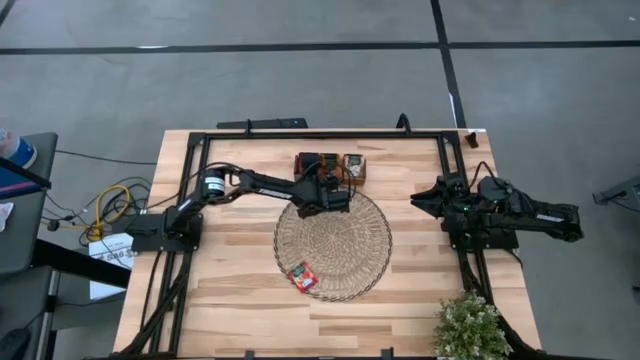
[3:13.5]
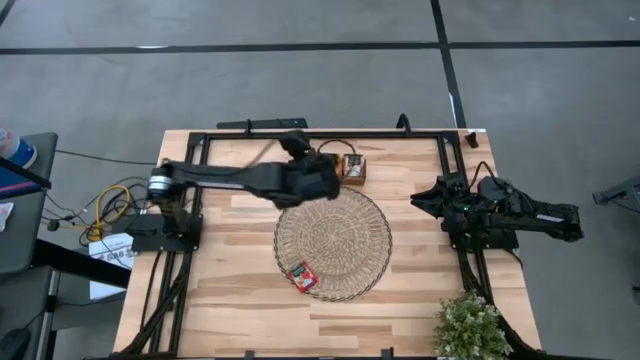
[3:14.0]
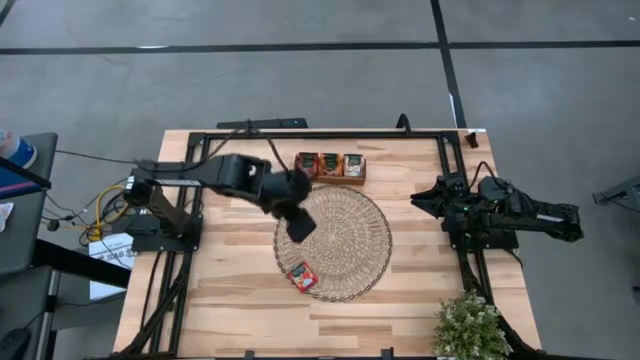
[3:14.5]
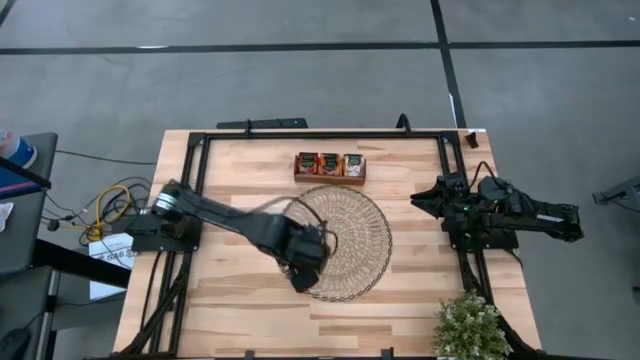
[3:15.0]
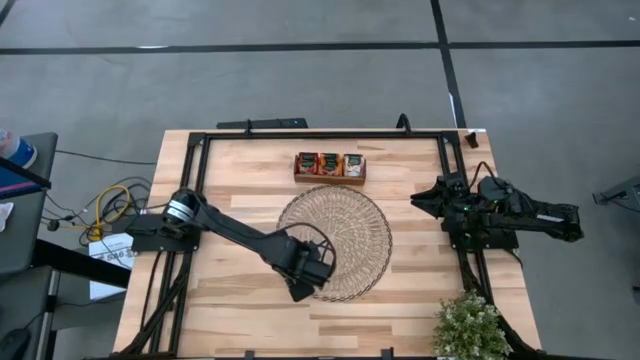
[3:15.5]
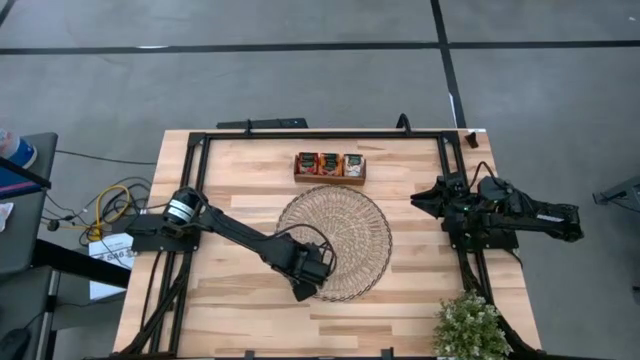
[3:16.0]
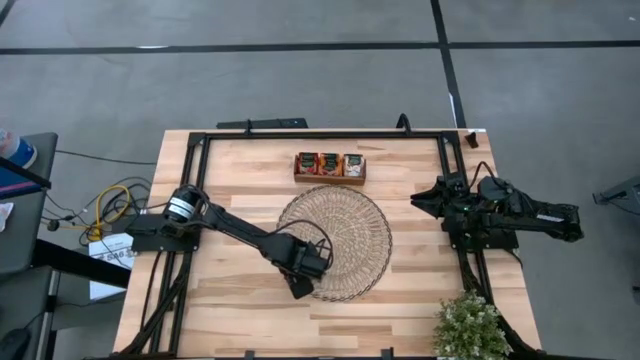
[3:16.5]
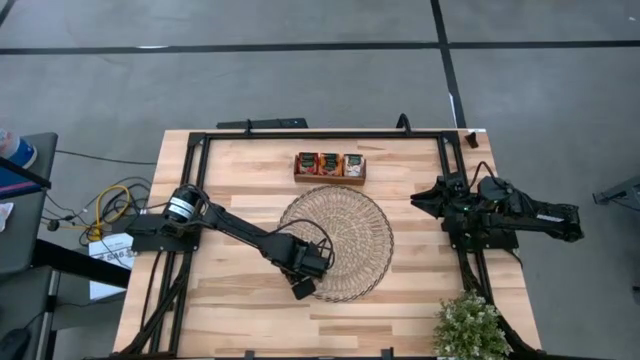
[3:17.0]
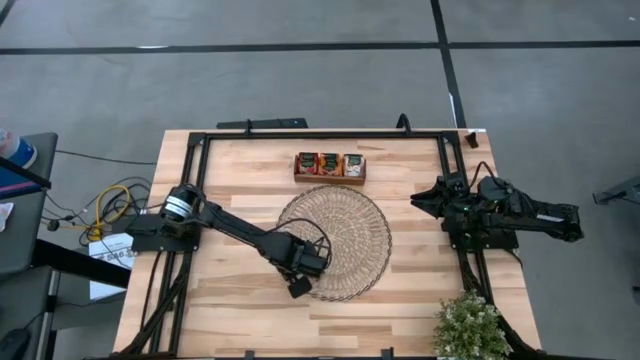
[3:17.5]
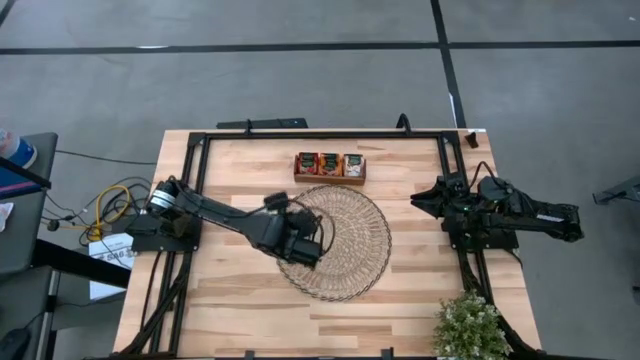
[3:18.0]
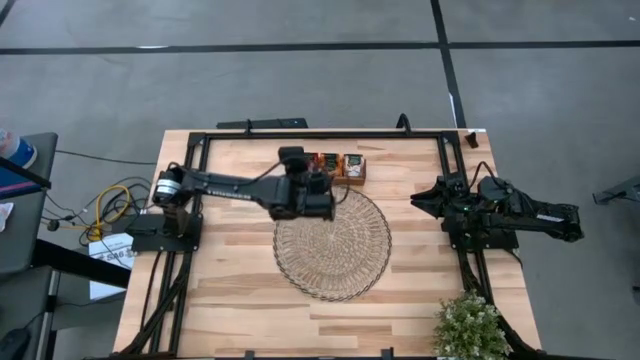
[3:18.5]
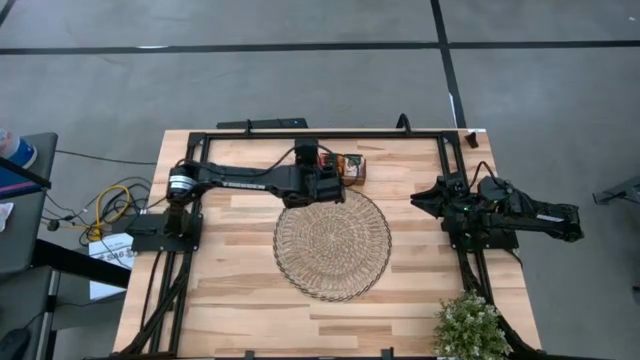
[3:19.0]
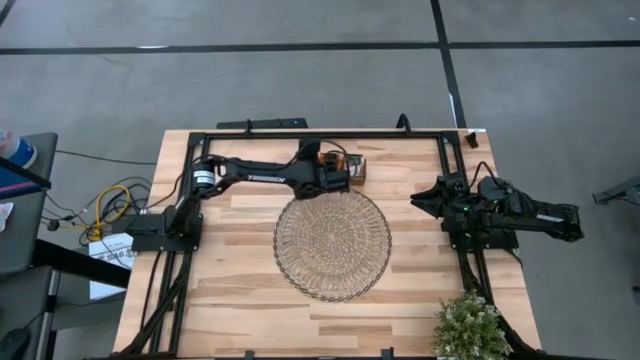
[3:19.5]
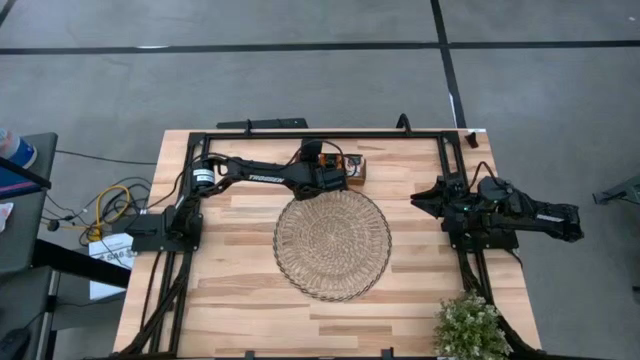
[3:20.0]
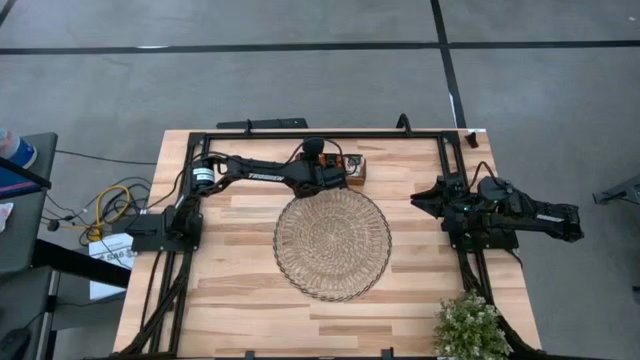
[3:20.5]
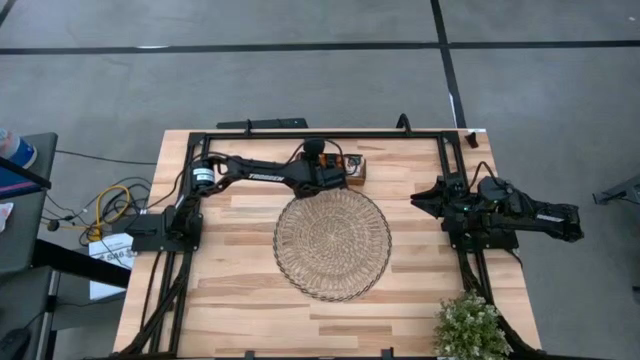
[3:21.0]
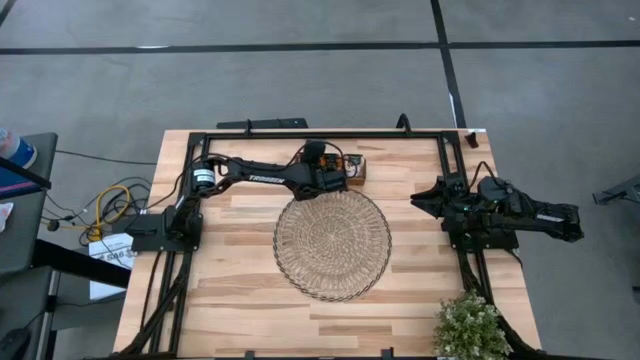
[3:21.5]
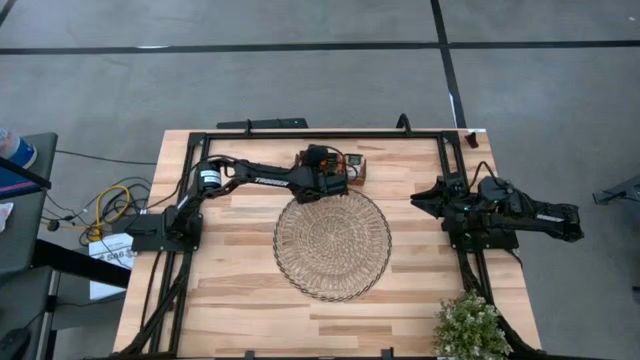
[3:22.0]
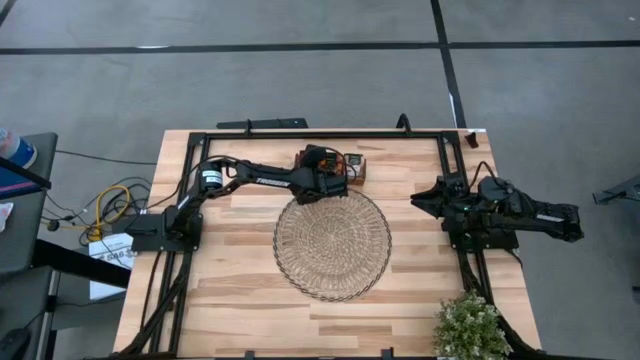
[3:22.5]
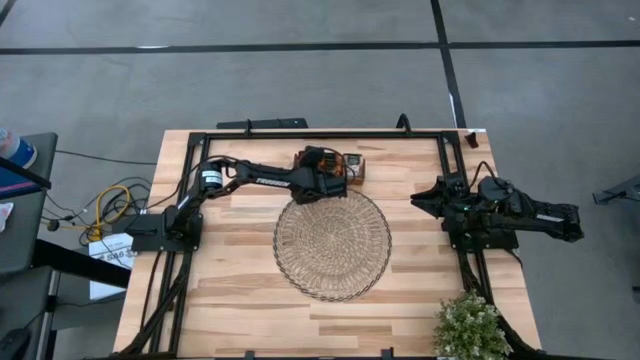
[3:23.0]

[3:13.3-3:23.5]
Task: Pick & Place Tea
Put the red tea bag into the left slot of the wooden organizer

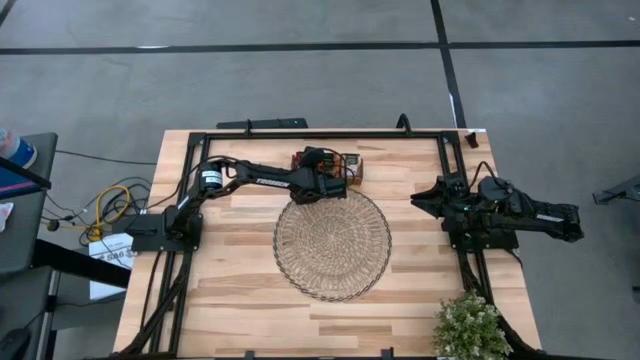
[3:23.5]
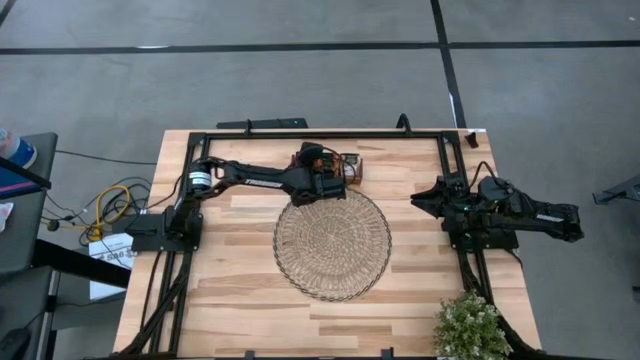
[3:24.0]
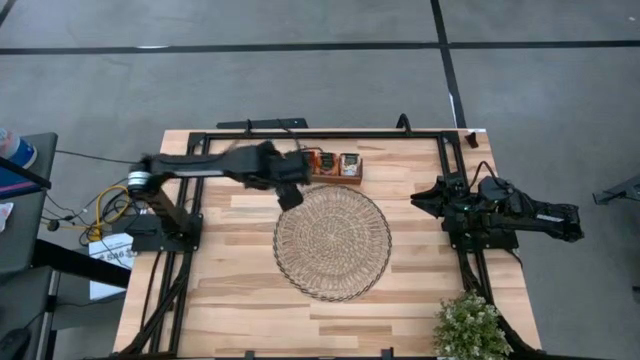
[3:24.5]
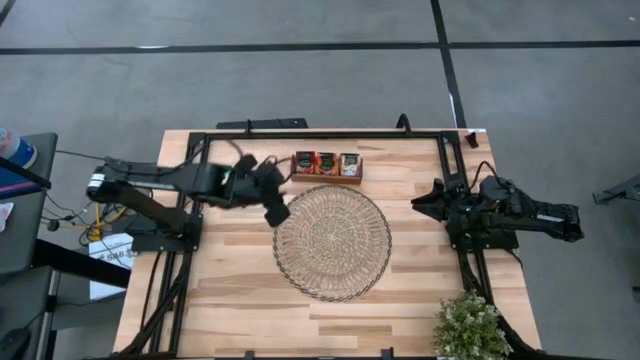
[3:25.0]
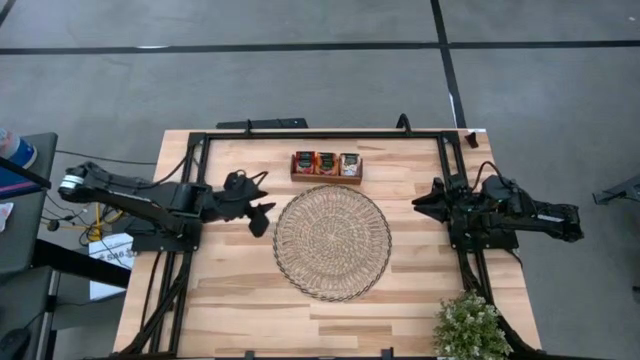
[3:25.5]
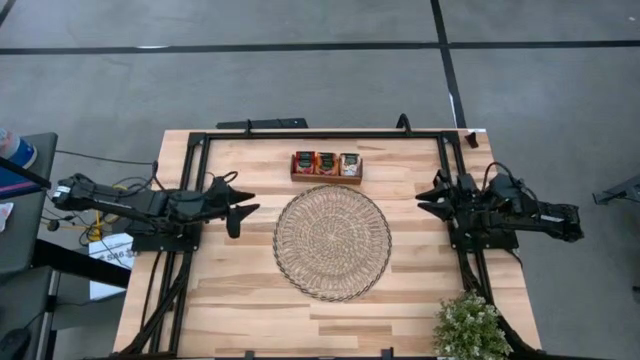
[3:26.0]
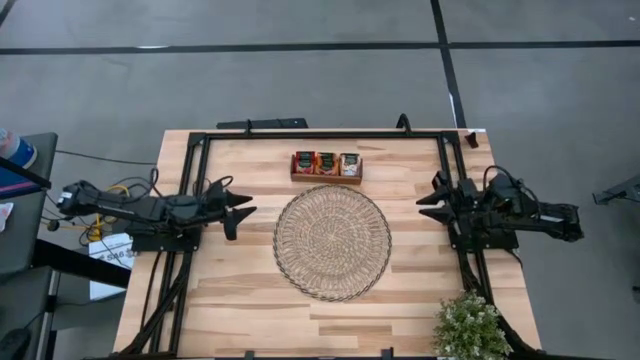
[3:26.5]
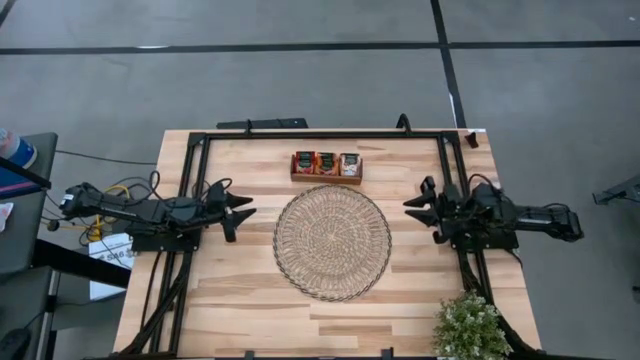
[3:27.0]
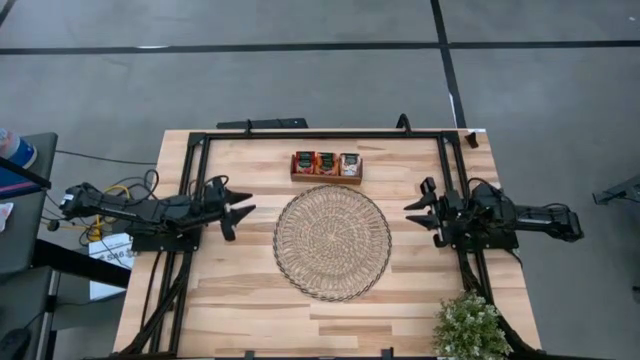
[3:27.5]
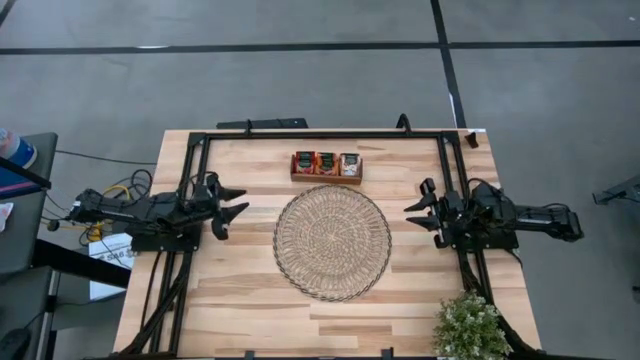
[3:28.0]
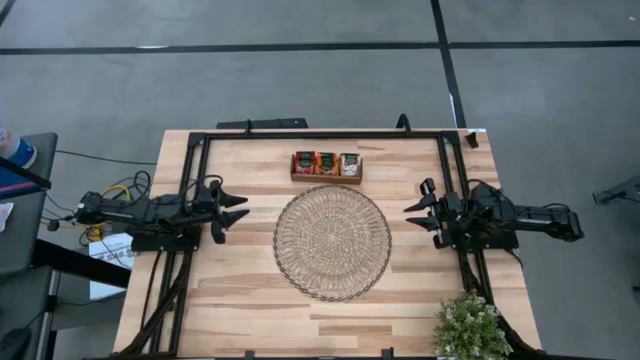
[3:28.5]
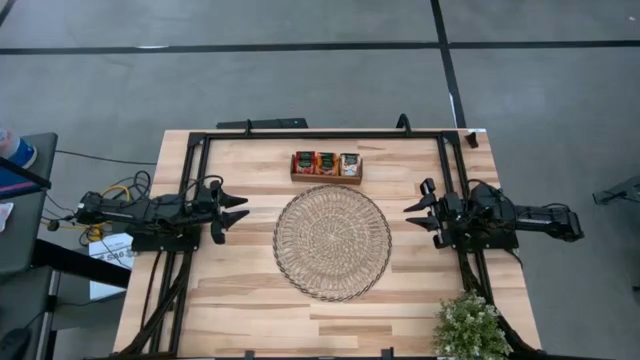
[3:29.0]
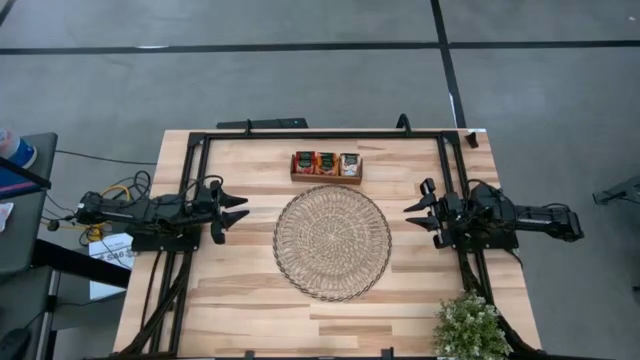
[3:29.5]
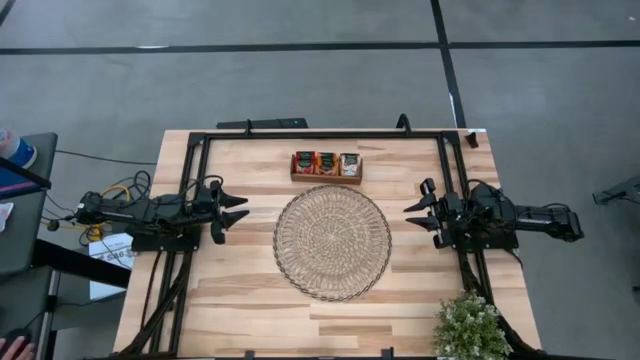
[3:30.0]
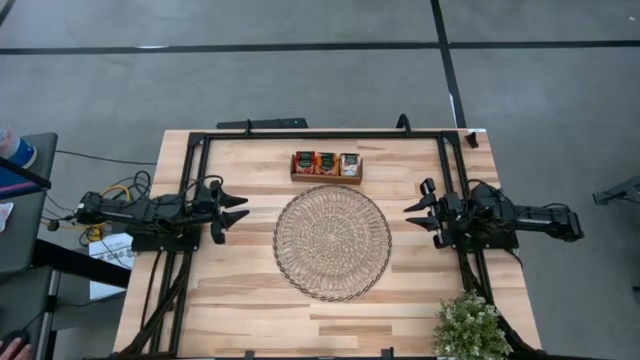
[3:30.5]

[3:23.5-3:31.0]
Return to Home Position

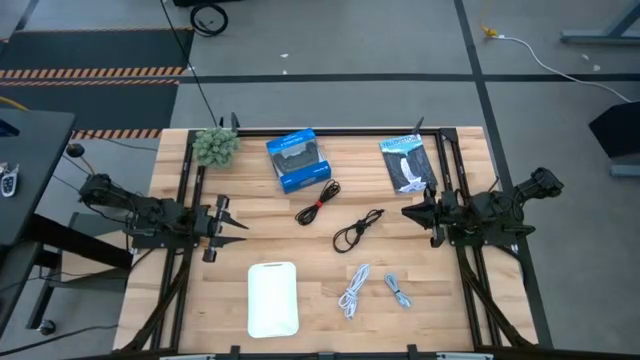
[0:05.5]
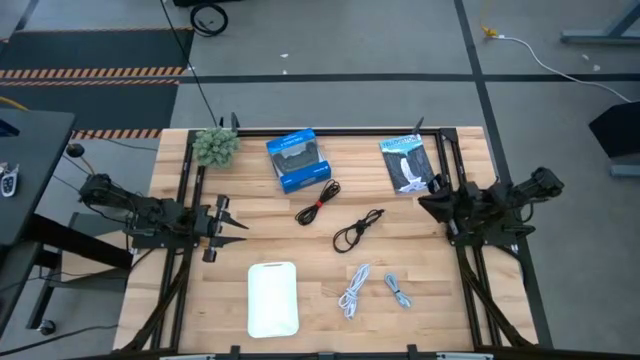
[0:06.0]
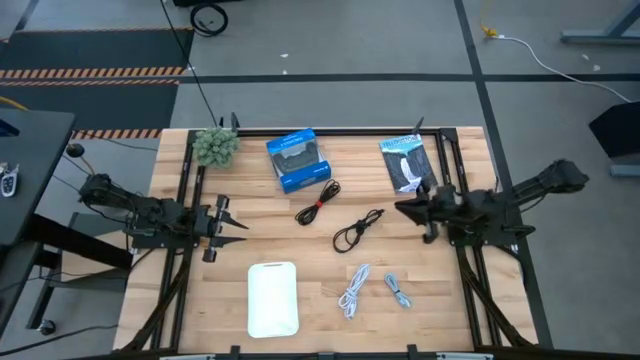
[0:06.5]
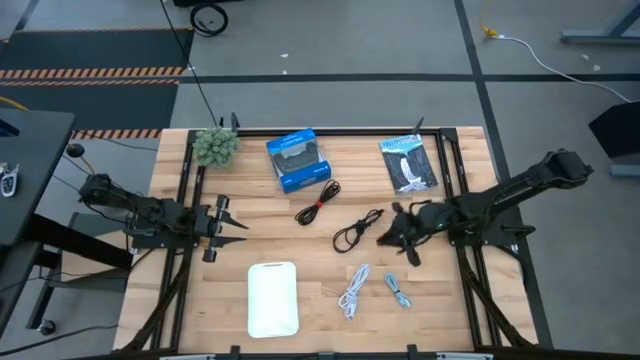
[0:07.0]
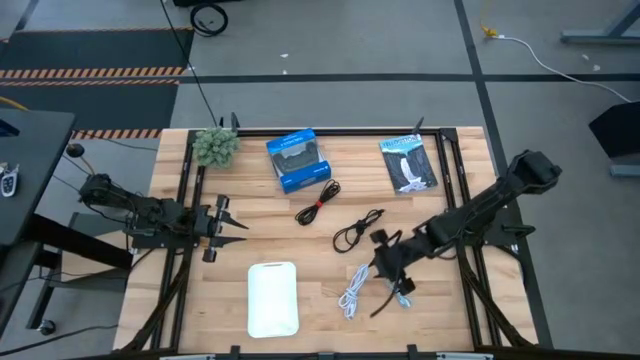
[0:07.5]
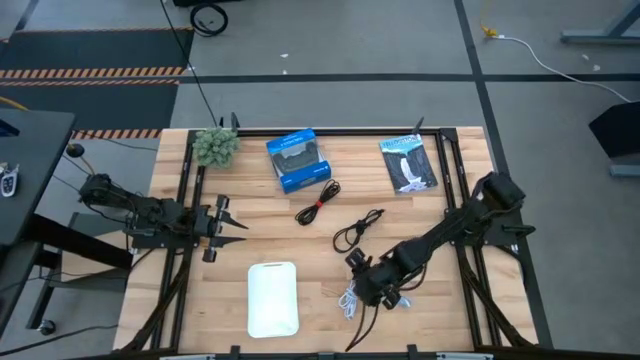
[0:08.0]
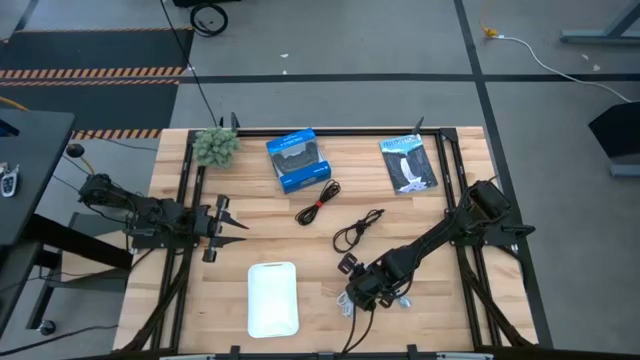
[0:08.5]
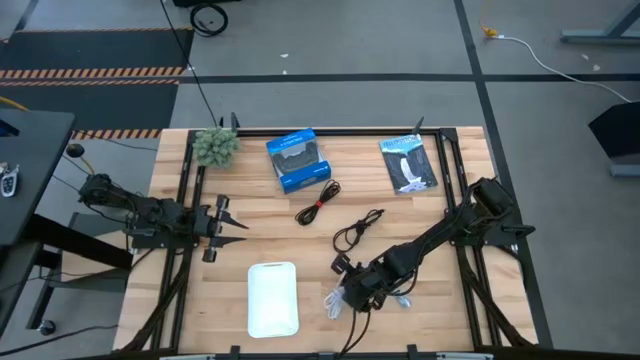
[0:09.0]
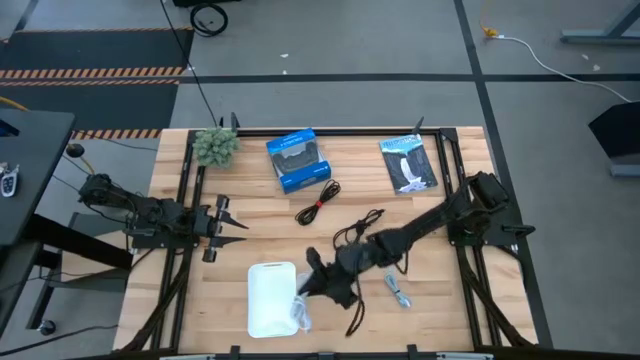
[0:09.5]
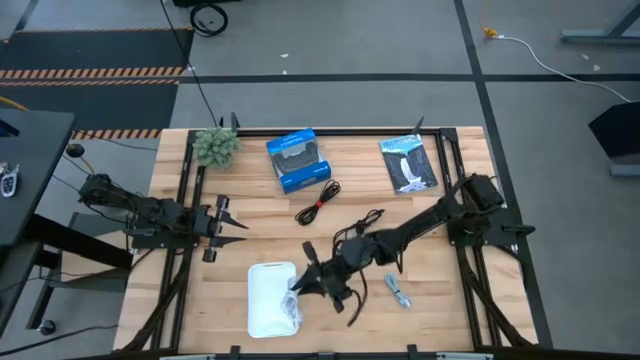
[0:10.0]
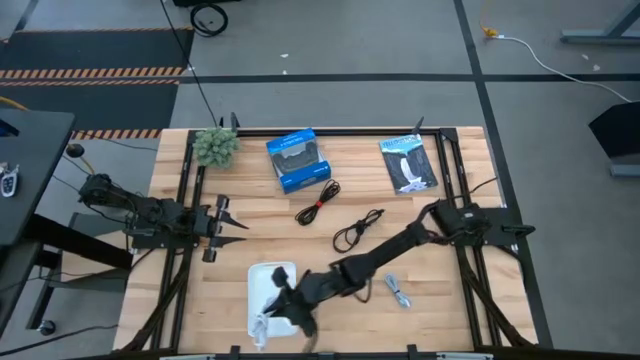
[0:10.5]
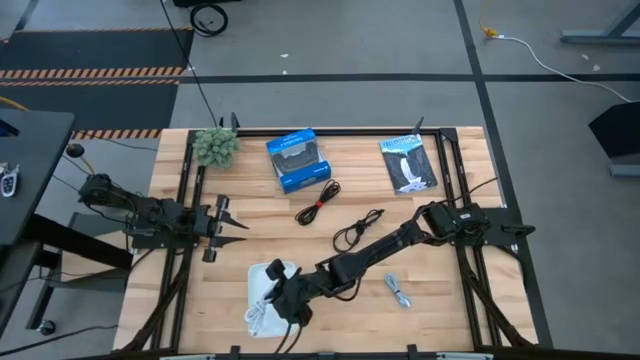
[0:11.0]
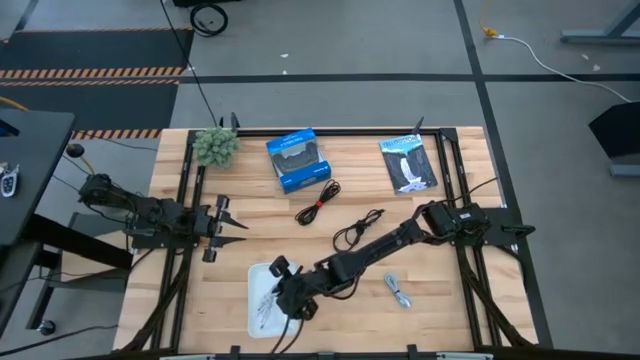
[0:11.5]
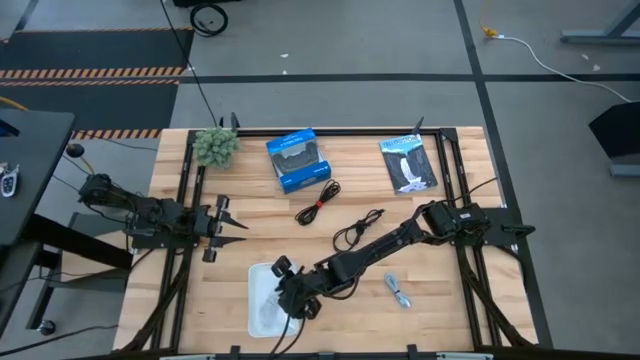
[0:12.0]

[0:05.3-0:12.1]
Task: Pick and place USB-C Cables
Put the left white charger cable into the white bin
